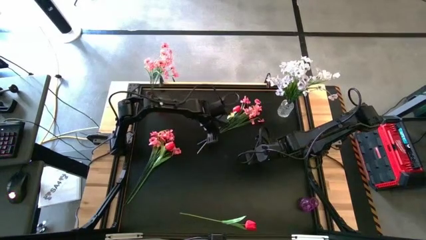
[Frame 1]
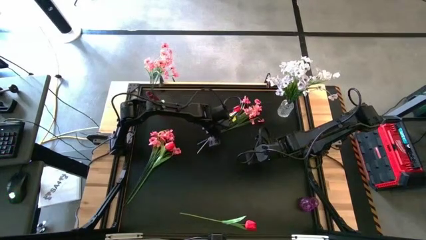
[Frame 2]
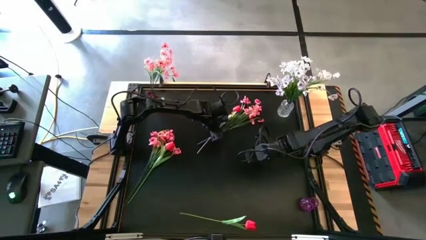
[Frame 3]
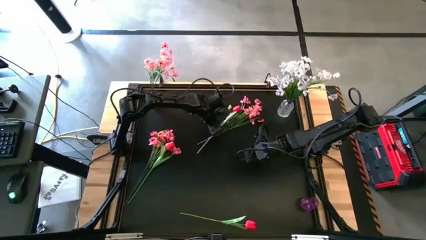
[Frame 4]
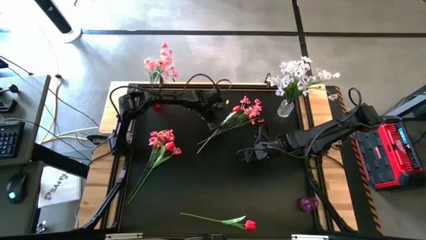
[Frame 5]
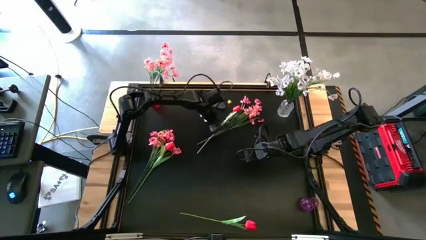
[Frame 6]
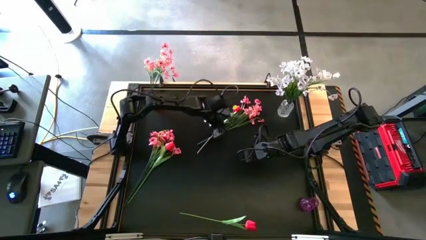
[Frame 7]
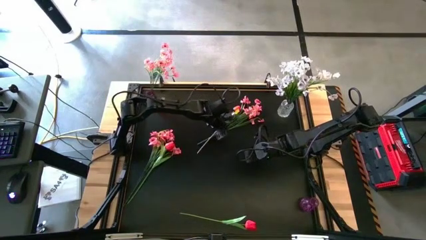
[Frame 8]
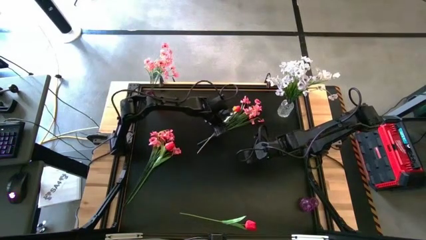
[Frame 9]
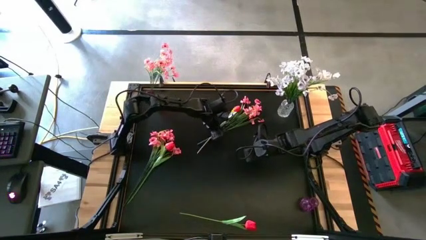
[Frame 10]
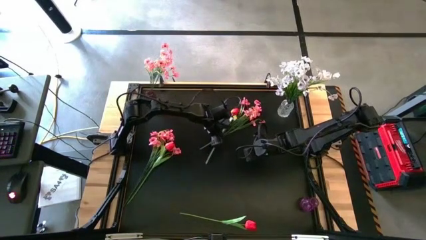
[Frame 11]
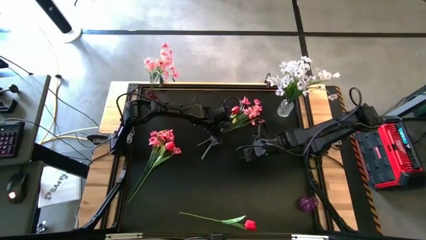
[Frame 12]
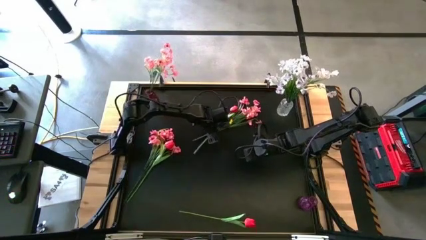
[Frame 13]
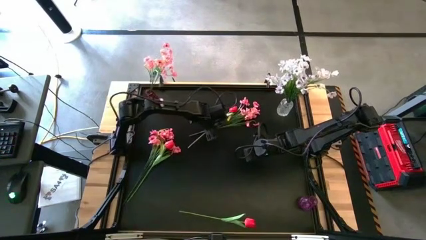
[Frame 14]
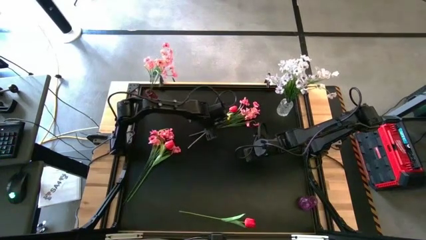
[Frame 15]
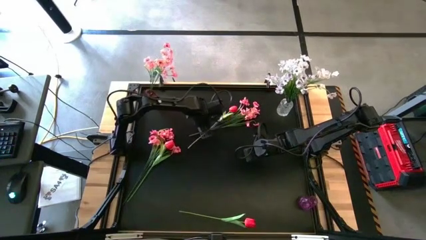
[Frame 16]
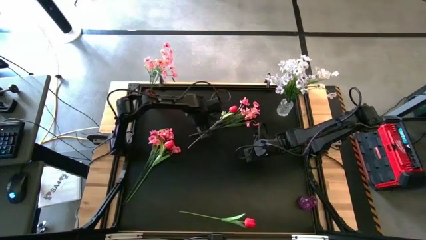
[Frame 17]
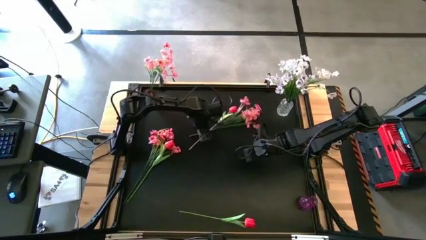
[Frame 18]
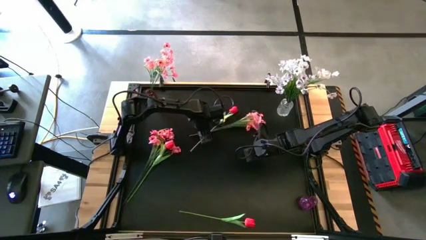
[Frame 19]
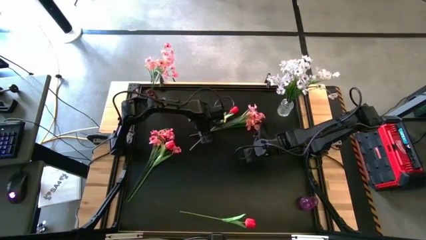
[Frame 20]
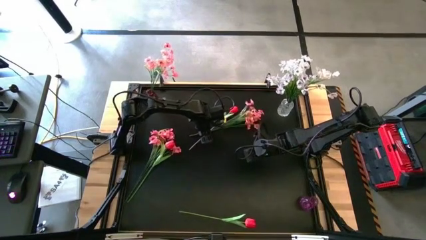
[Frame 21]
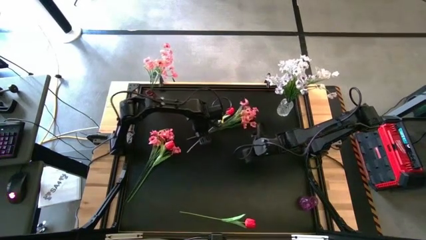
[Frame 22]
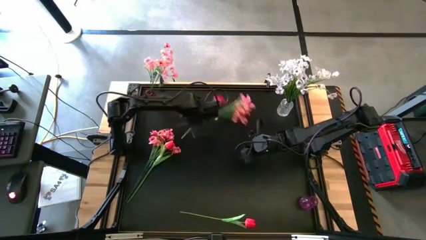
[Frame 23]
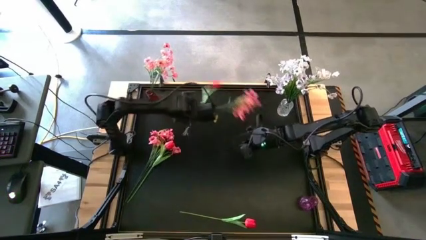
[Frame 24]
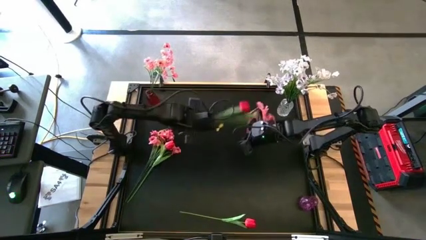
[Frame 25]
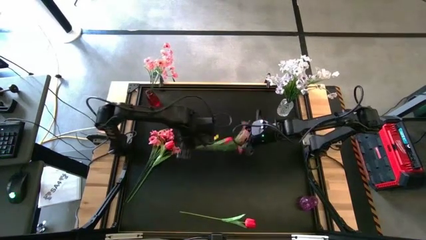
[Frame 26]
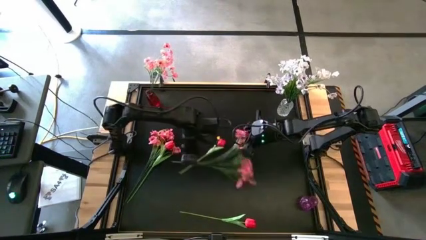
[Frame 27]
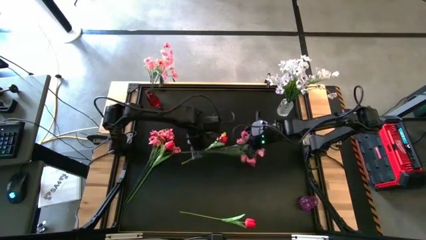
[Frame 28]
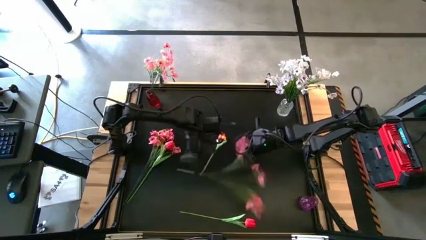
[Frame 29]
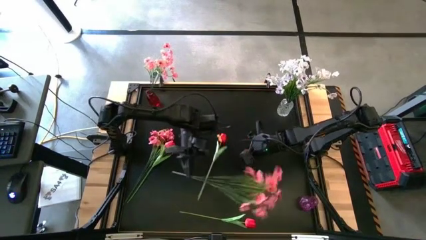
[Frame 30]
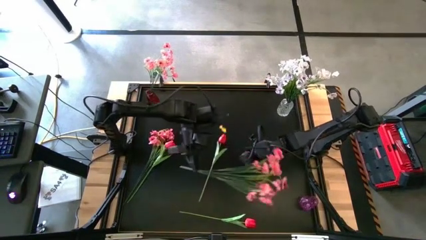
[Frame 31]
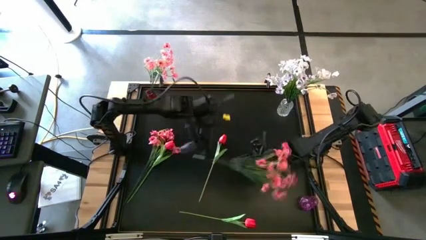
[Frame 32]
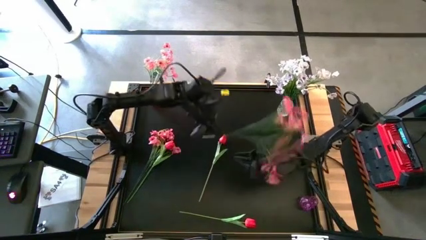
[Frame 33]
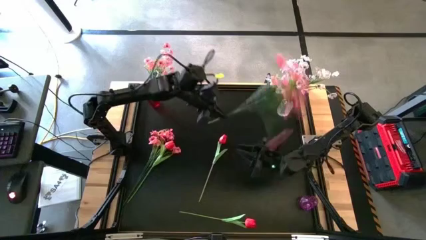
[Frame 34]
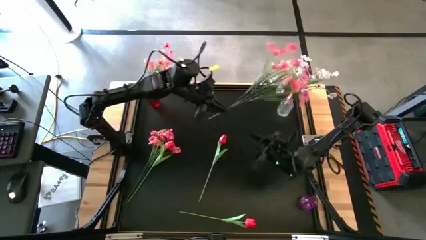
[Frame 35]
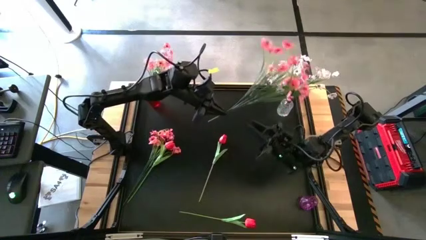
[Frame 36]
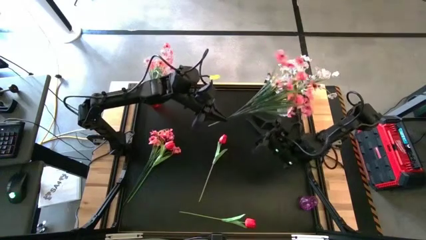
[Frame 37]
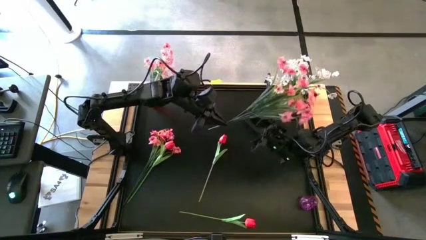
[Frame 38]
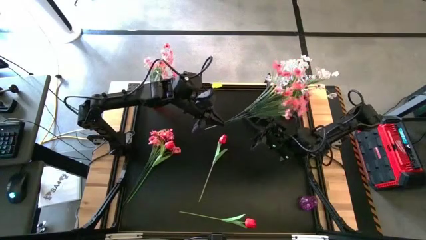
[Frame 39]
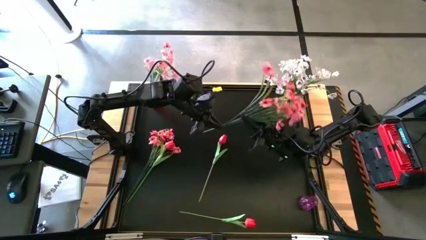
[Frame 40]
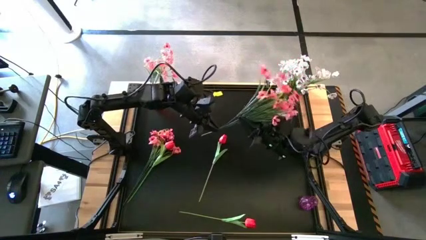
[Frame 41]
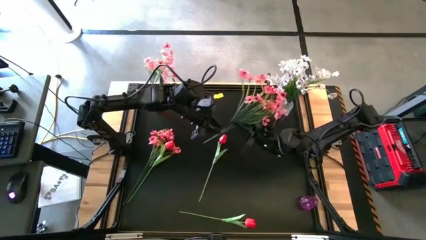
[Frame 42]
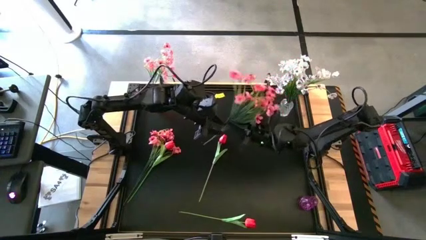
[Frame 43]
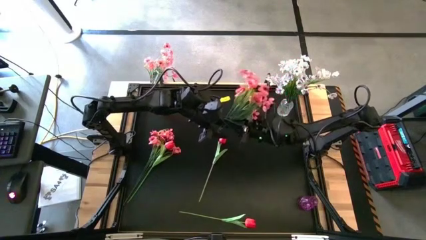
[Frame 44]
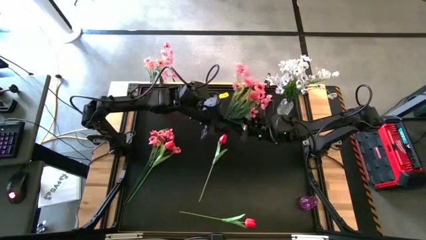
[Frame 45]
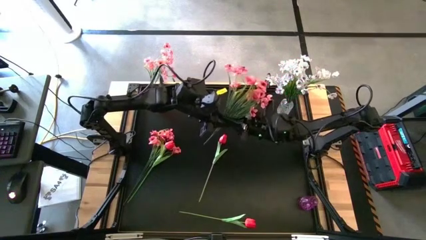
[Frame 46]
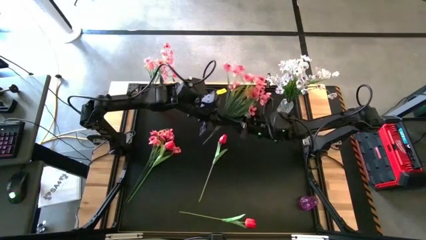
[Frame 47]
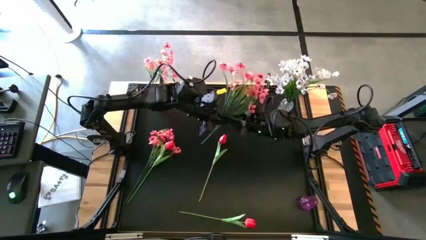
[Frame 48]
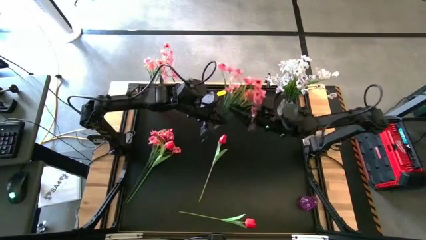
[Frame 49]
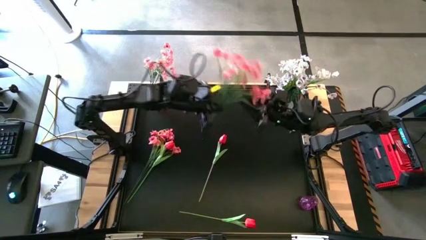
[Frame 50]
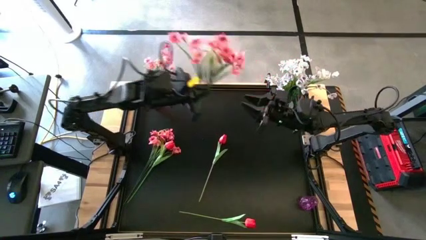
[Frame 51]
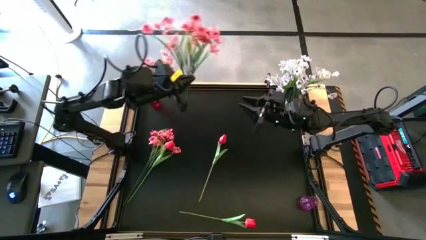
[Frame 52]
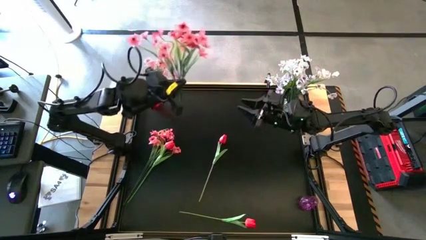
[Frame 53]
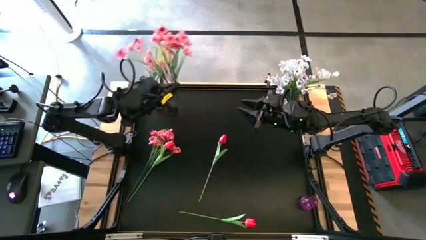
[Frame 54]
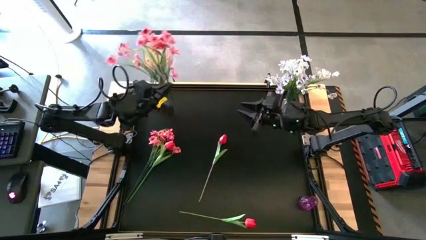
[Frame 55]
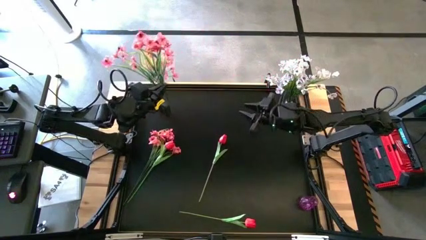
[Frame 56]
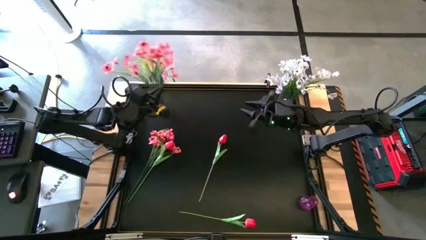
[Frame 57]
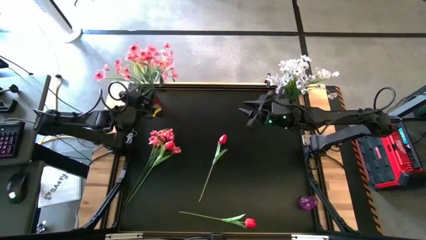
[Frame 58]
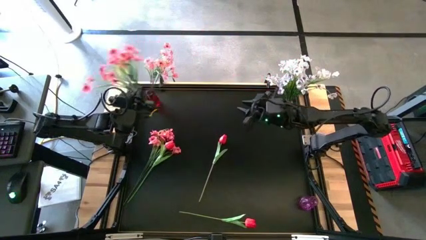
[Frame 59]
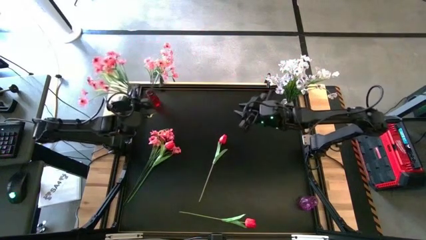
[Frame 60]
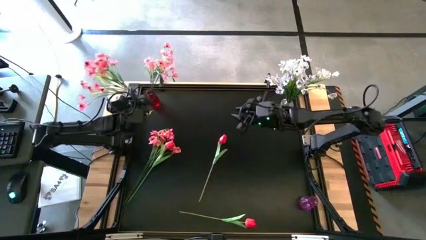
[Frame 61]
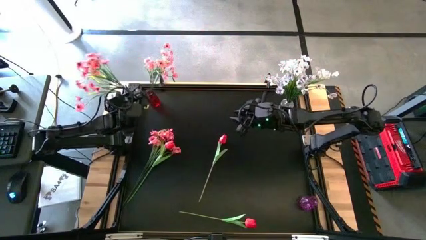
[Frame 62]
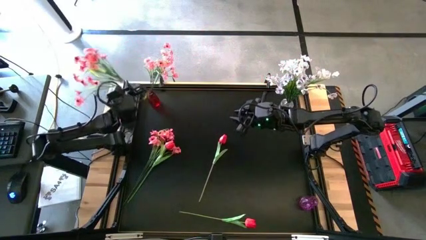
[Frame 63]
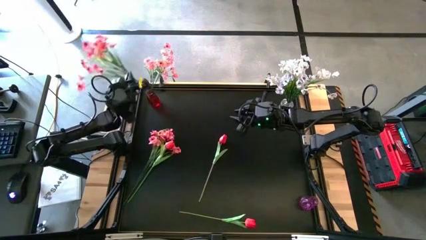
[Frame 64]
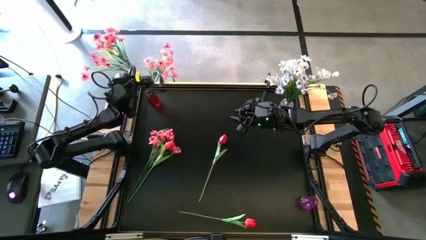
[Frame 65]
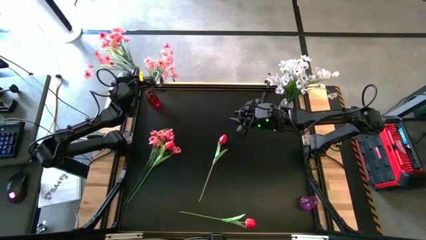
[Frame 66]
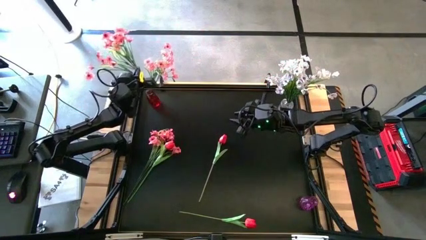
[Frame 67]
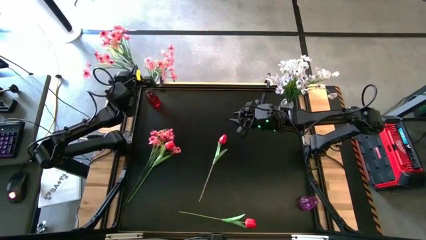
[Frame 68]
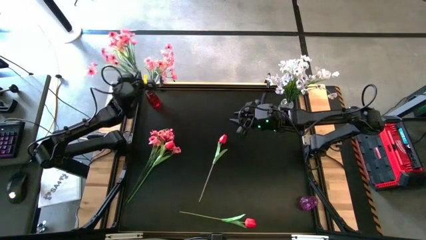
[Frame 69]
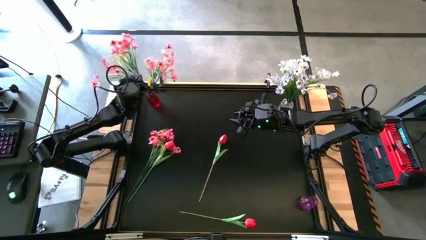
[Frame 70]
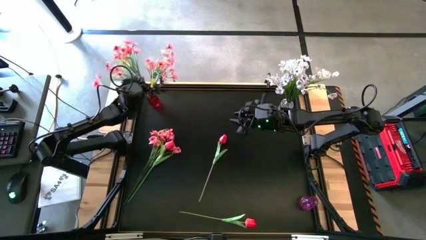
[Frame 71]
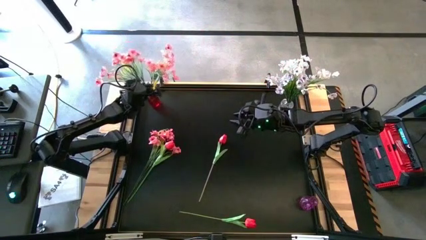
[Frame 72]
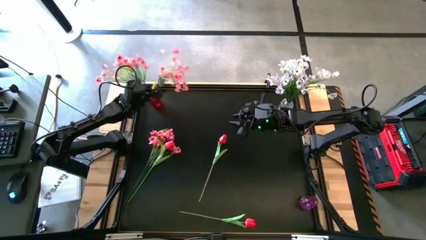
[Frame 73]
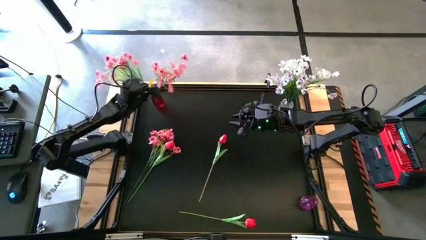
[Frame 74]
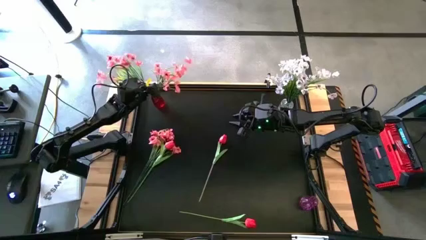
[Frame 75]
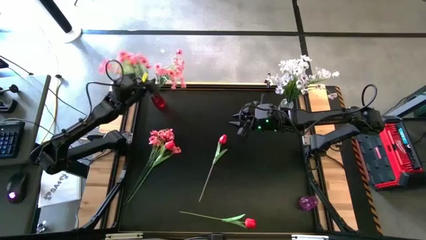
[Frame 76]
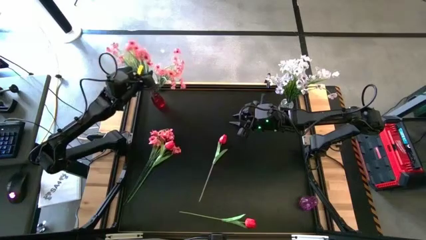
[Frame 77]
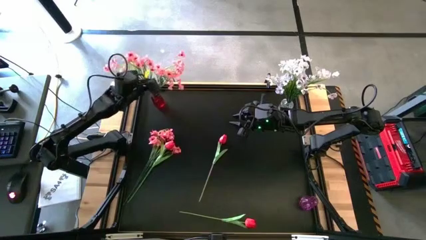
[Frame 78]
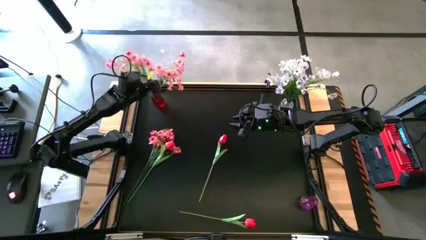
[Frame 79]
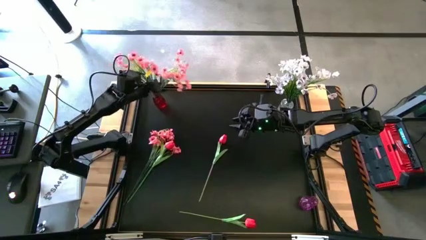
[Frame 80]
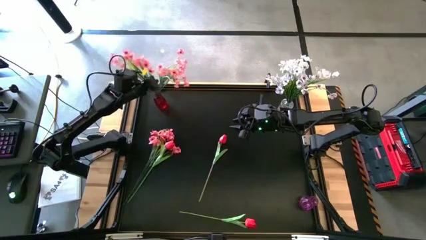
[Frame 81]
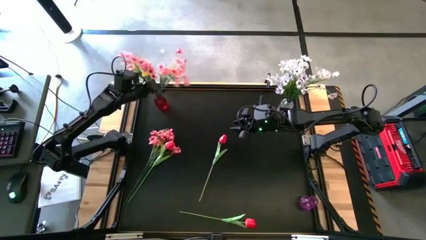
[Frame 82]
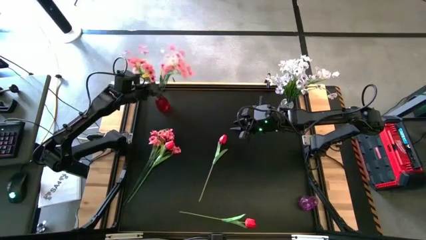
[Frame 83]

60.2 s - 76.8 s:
Task: Sort flowers into vase by color
Put the top pink flowers into the red flower vase
